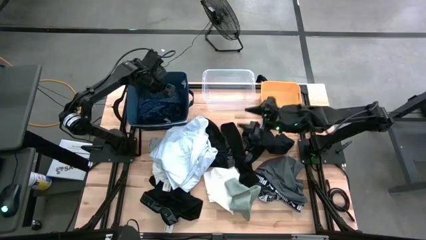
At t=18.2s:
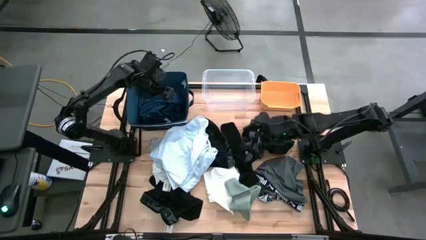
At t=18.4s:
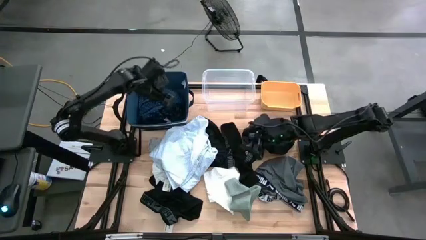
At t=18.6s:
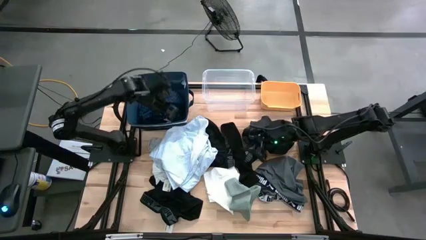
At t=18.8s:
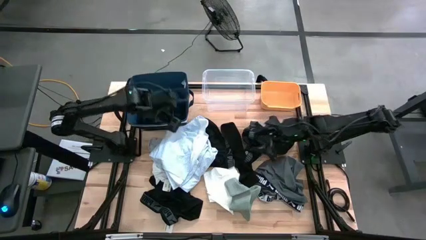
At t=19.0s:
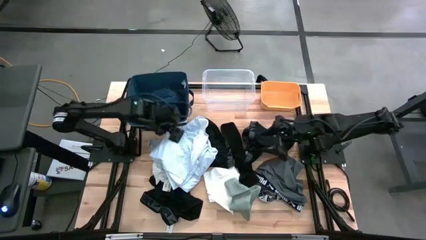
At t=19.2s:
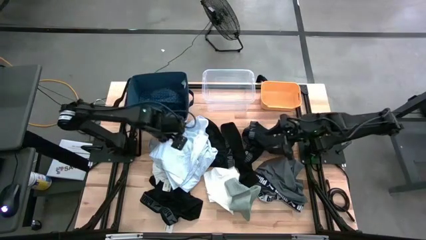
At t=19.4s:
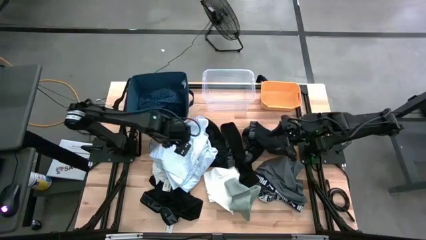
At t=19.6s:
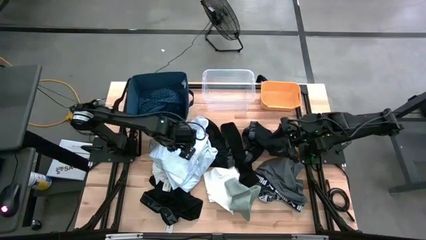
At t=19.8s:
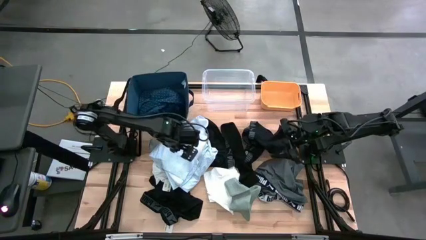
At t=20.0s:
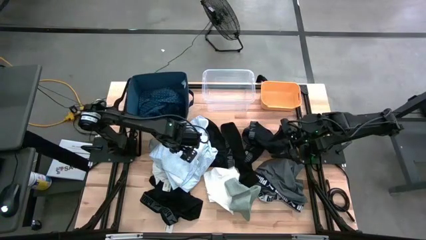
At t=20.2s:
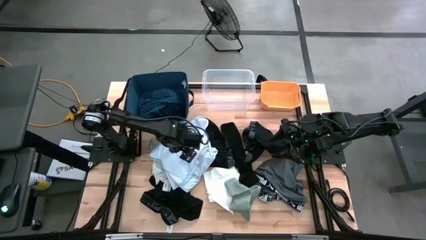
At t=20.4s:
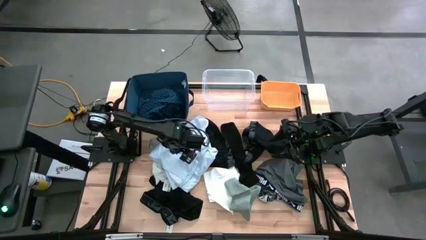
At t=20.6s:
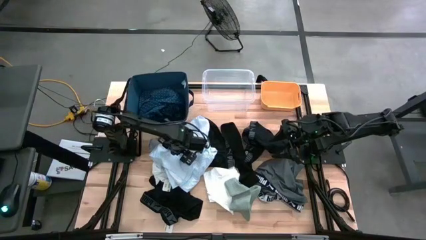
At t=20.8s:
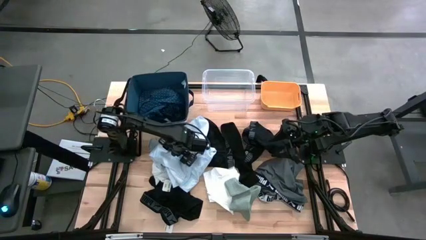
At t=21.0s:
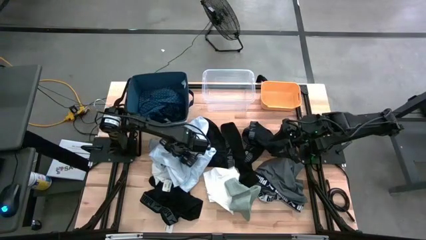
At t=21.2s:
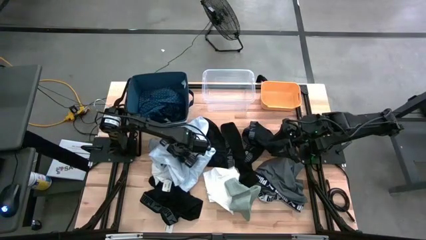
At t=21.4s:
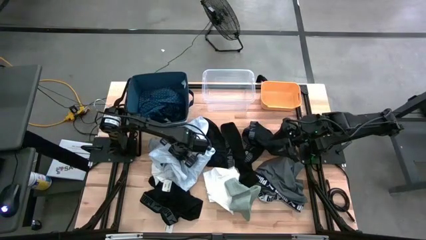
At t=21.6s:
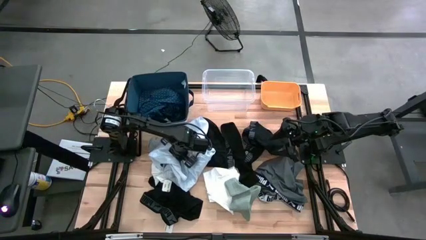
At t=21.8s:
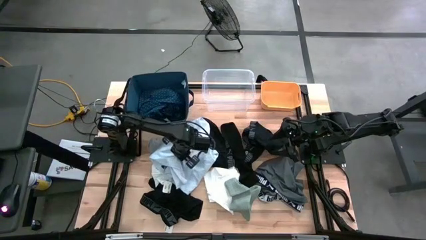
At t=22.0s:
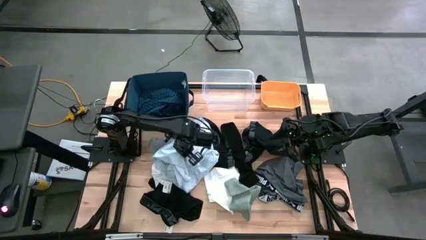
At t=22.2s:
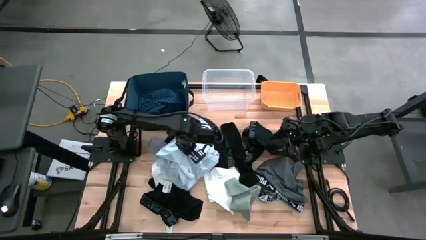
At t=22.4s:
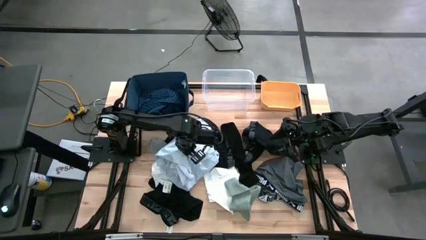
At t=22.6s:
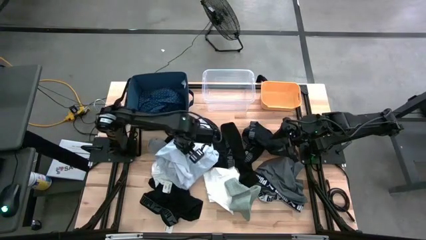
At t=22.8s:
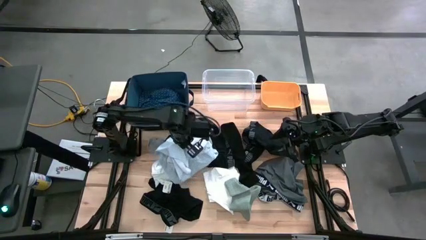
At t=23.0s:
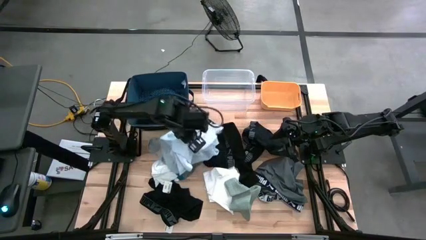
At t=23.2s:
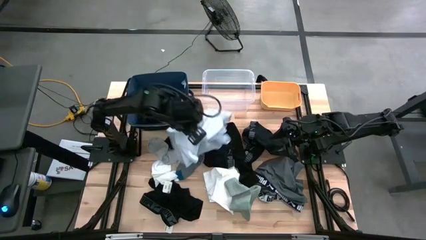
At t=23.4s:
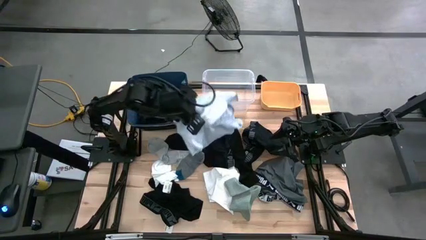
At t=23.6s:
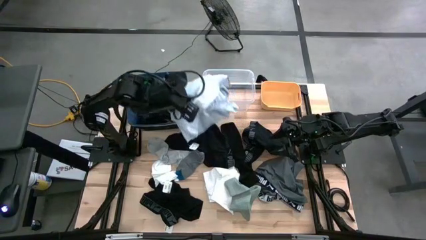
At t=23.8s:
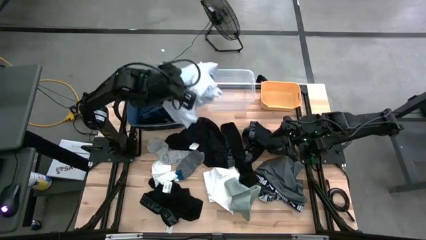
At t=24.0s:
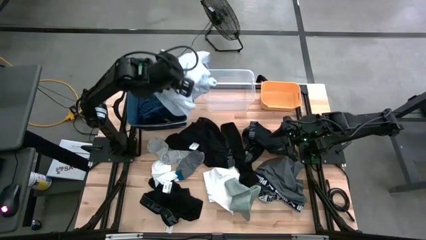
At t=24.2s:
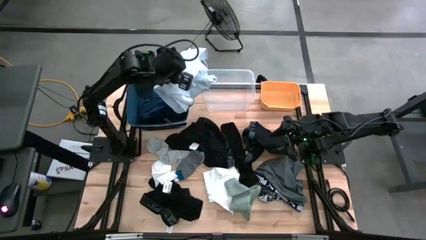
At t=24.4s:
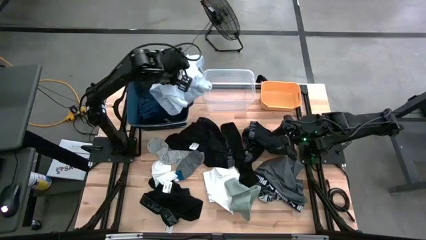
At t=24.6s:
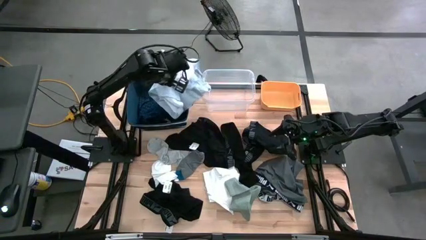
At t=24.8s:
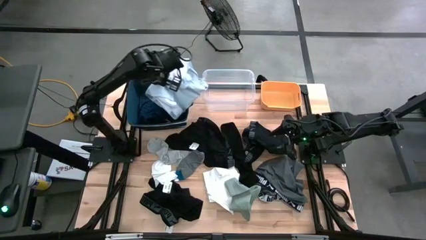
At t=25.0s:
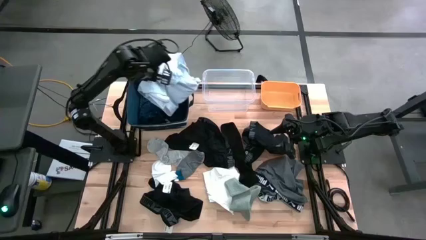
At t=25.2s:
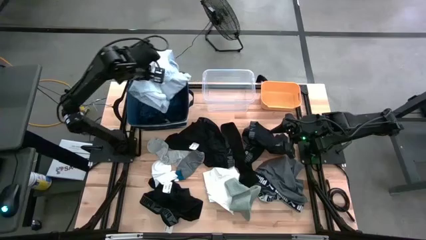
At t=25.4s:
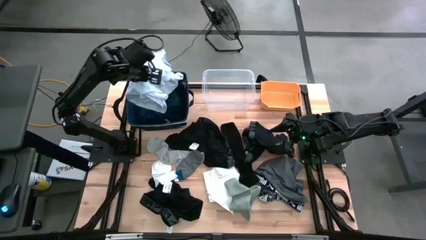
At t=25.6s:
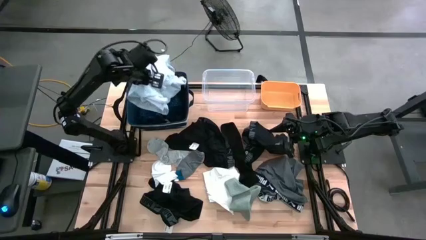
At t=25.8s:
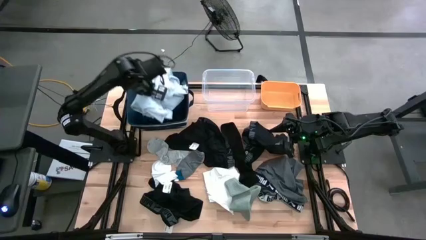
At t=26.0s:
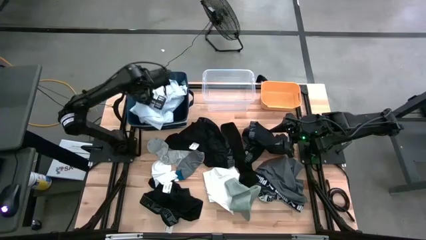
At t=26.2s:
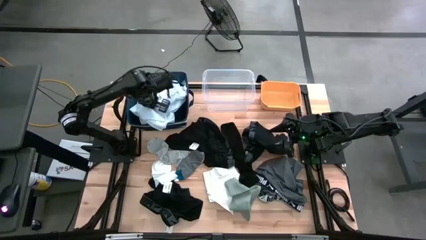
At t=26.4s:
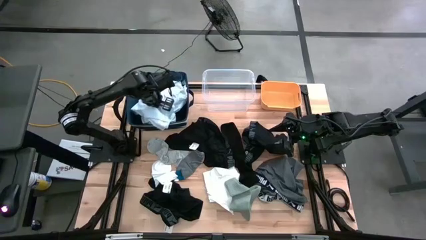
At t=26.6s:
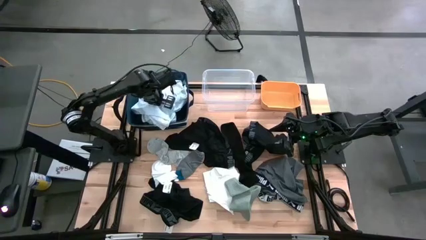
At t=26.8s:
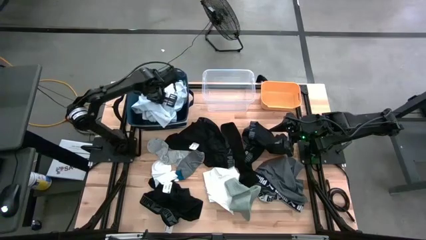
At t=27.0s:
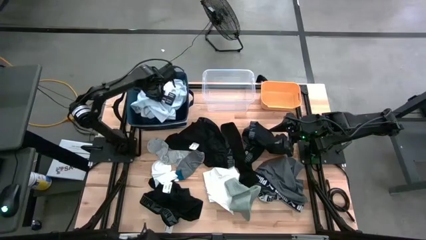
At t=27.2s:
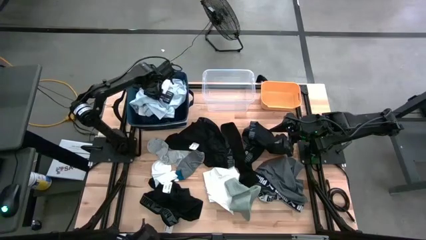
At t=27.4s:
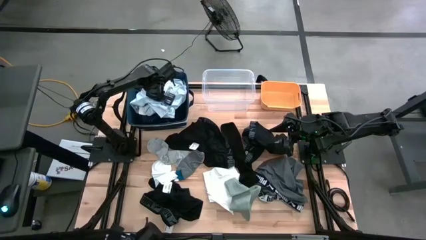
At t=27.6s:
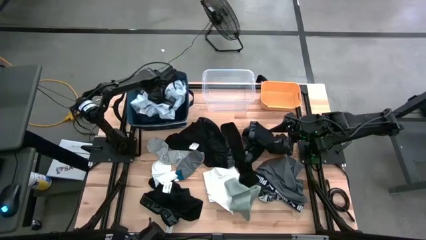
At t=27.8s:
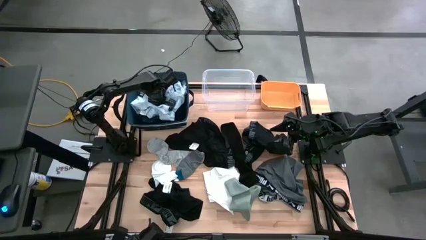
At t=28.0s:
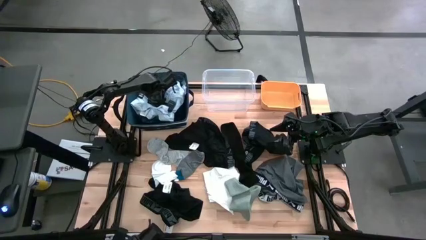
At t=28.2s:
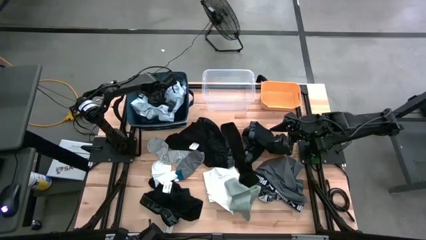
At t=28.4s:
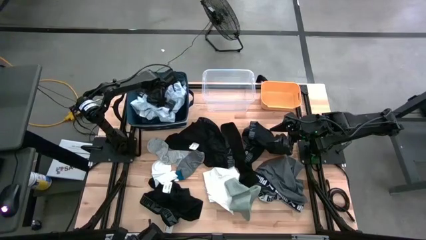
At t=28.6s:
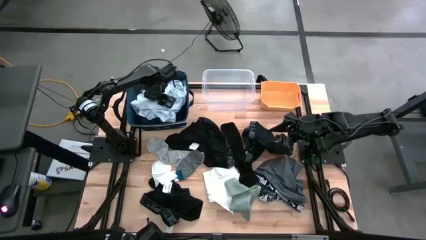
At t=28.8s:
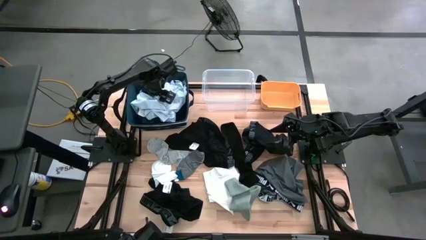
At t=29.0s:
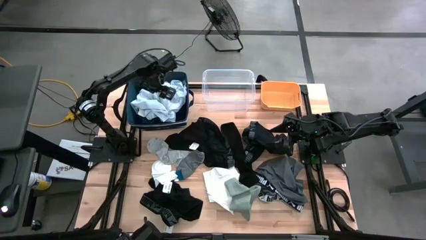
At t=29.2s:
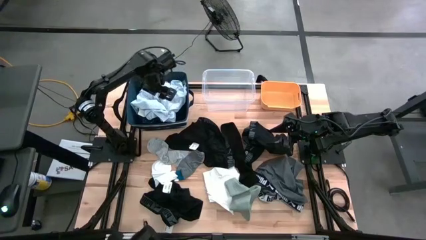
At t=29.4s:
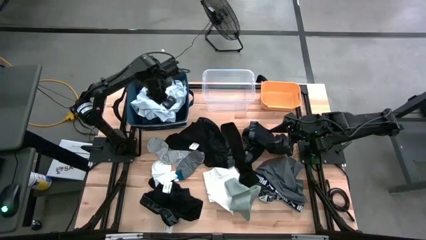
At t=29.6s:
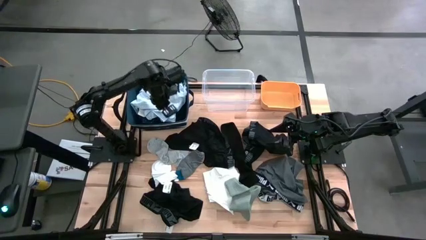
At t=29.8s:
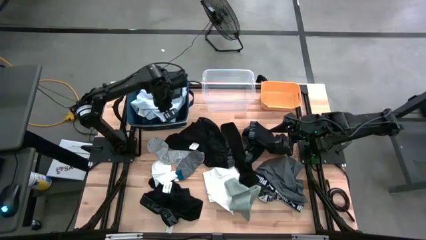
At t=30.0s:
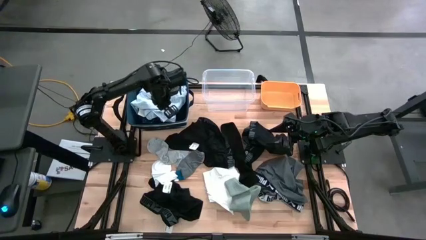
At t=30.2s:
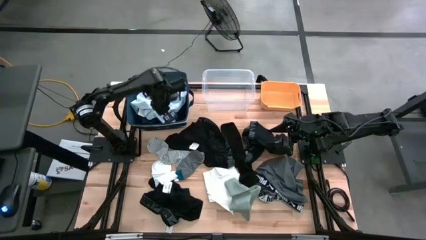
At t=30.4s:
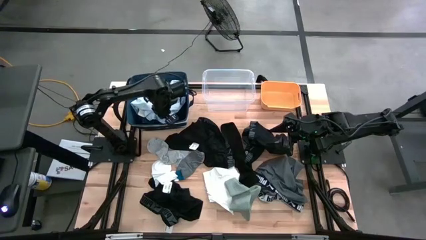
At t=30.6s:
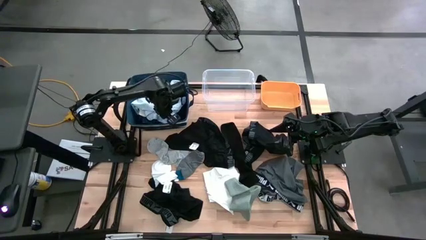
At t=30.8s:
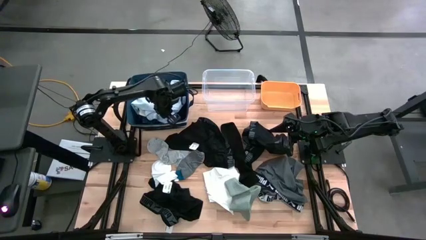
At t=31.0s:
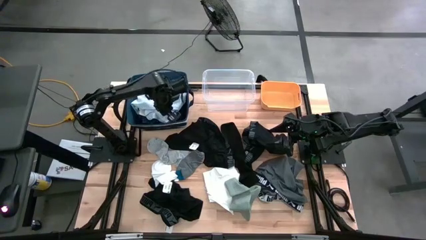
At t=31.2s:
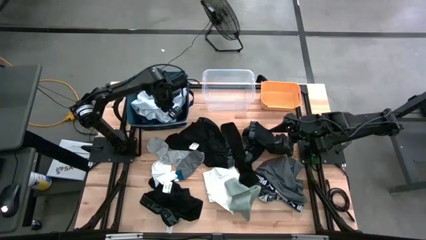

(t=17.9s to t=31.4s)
Task: Pick & Place Cloths
Put the white plaid shirt into the blue bin
